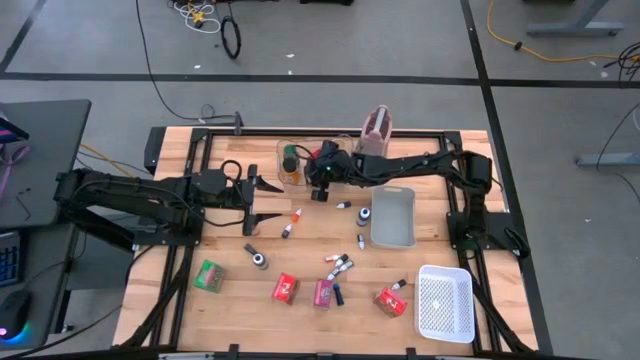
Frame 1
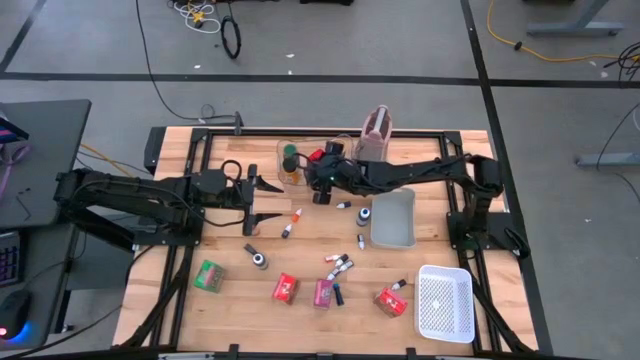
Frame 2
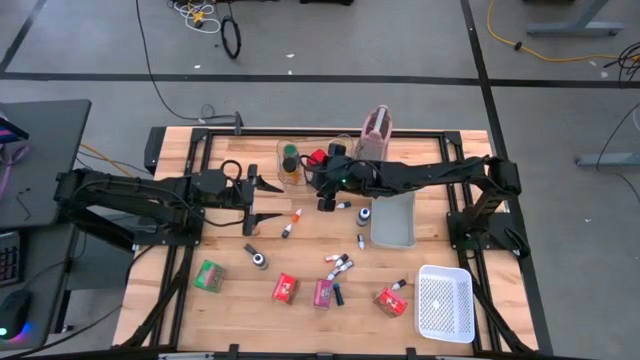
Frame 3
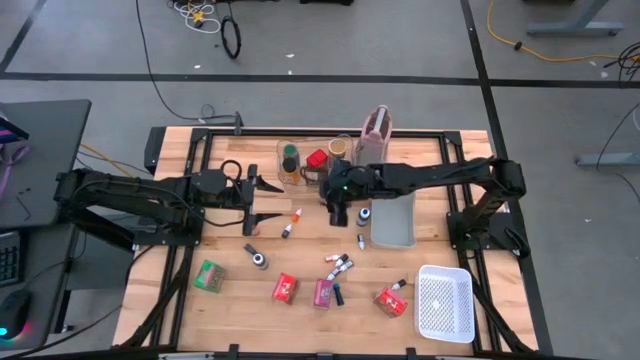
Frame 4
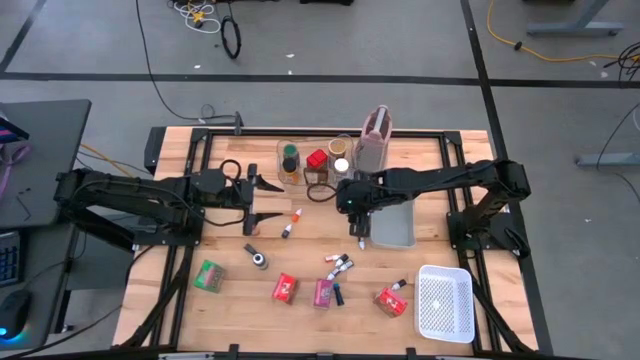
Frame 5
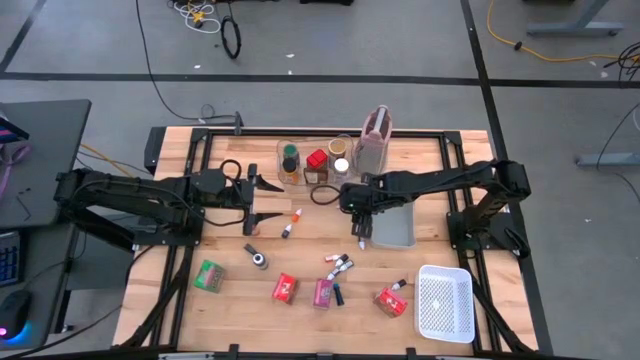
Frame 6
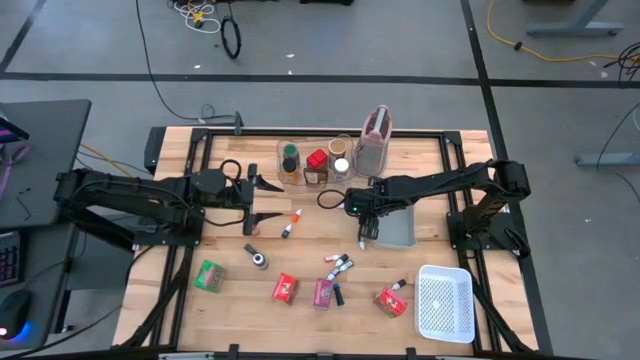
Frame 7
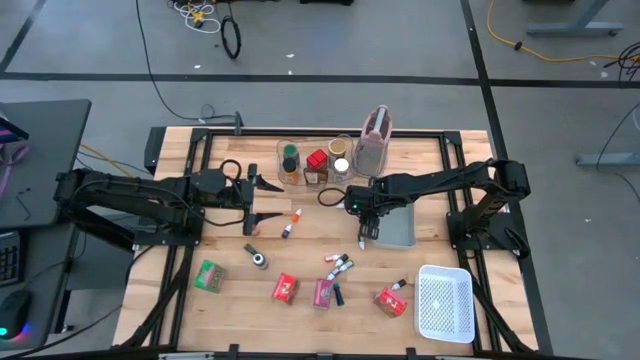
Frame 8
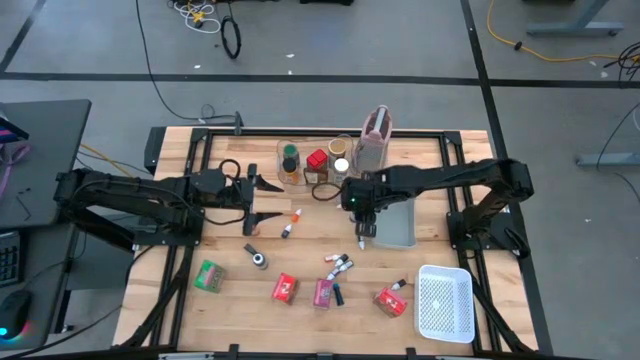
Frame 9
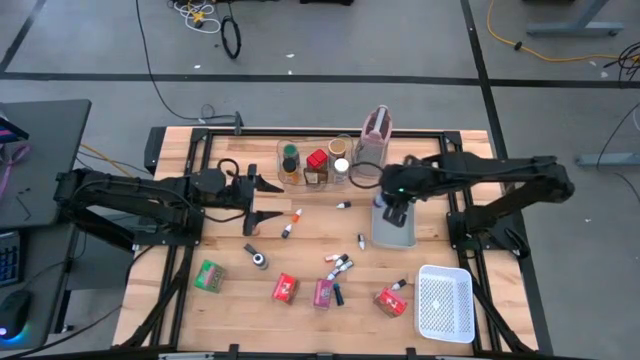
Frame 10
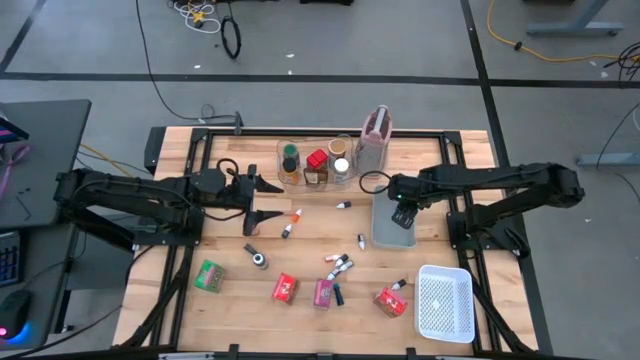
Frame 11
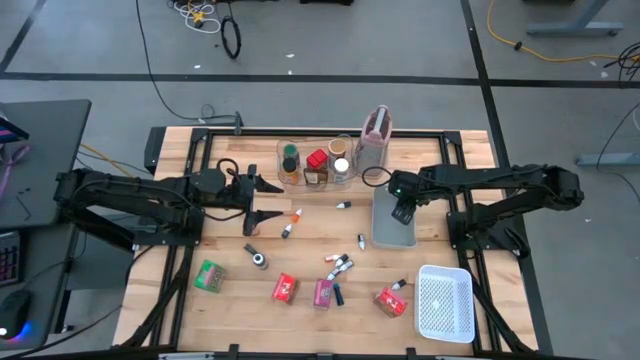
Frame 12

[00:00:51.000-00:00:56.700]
Task: Pick & Place Kitchen Items
Put the large blue food coloring bottle into the gray bin

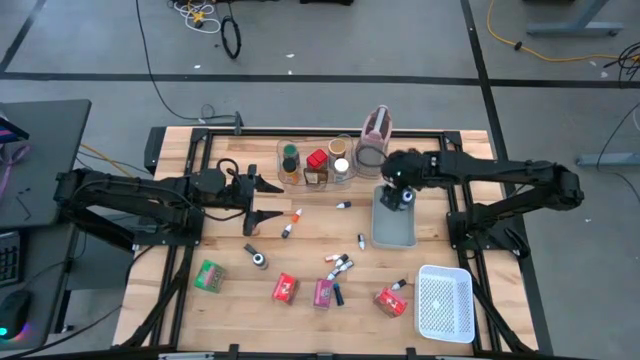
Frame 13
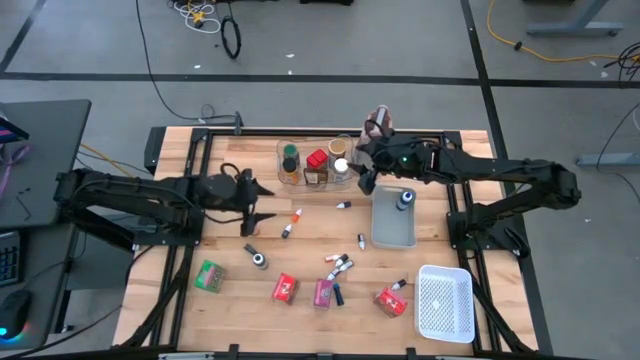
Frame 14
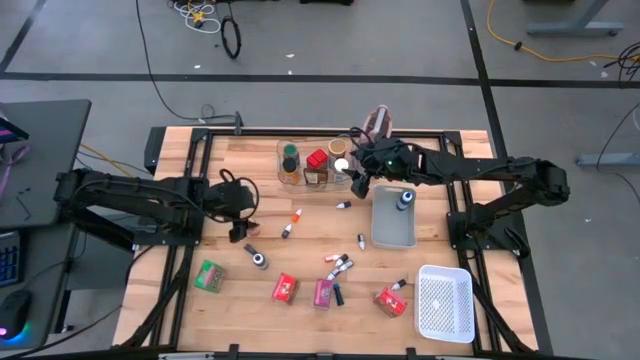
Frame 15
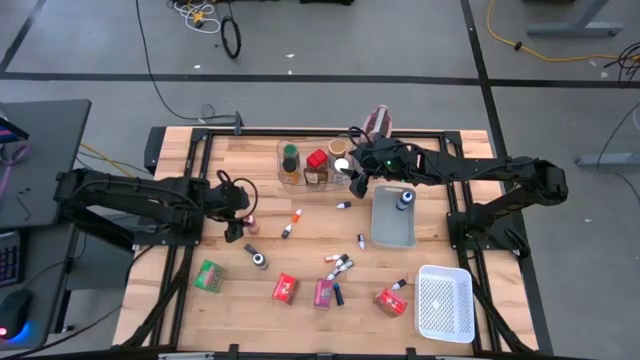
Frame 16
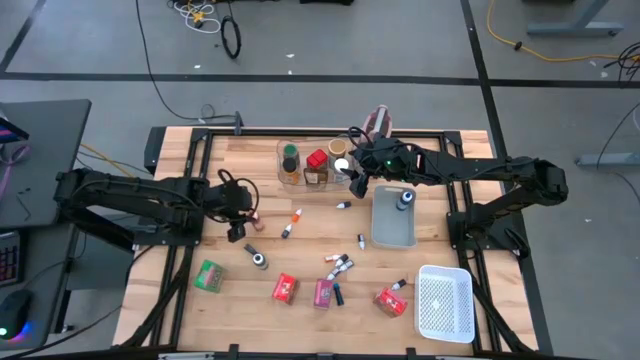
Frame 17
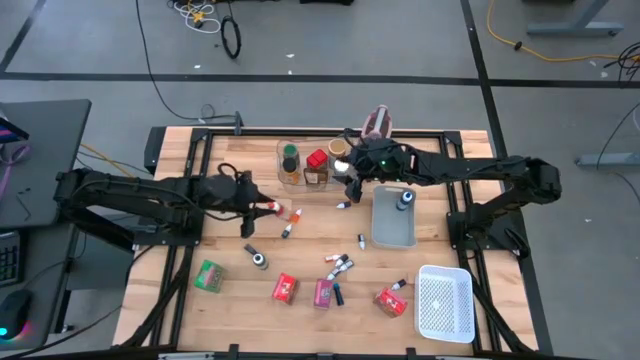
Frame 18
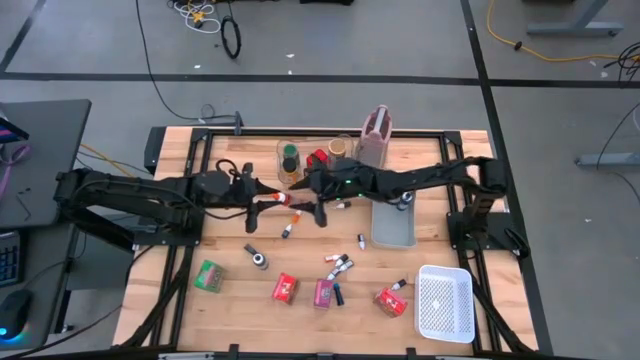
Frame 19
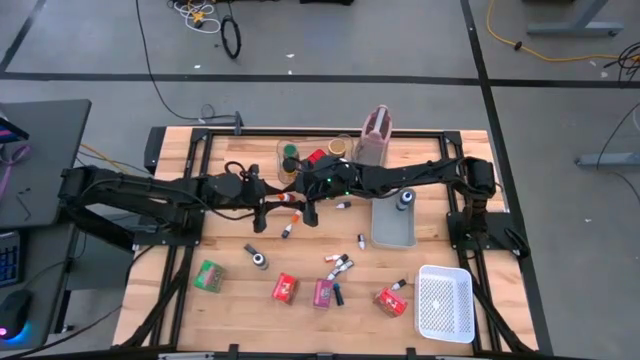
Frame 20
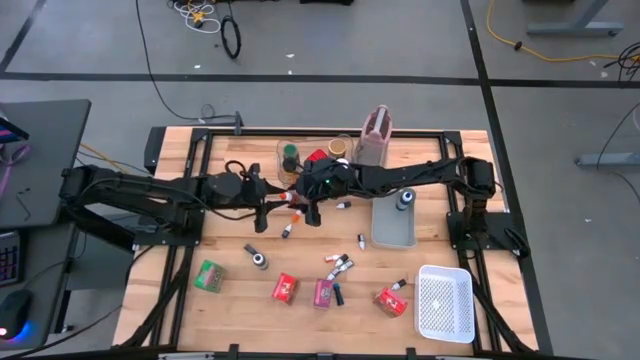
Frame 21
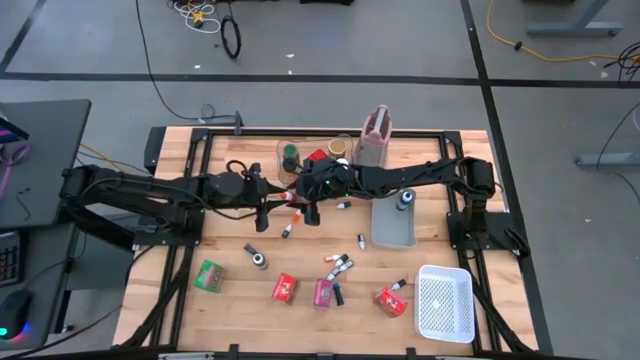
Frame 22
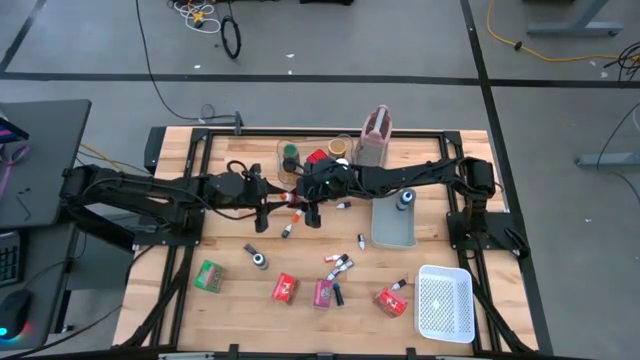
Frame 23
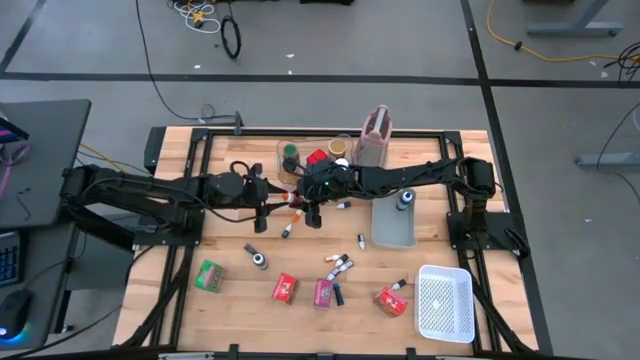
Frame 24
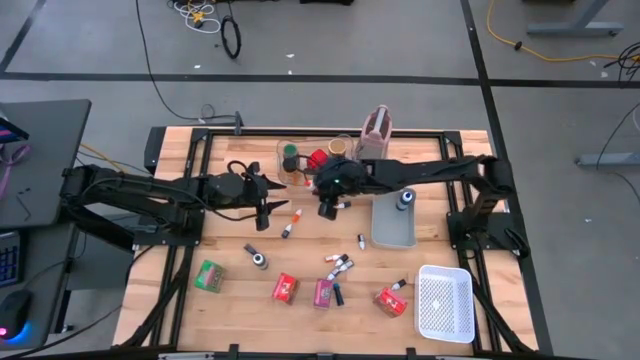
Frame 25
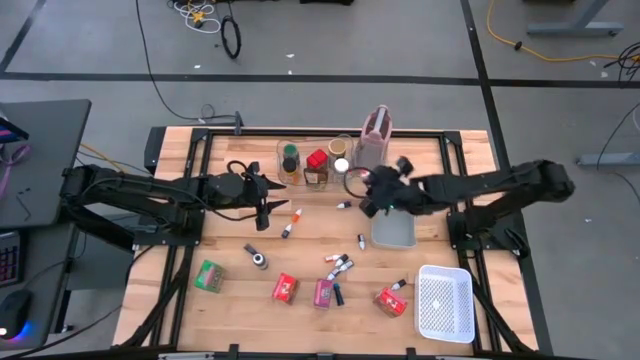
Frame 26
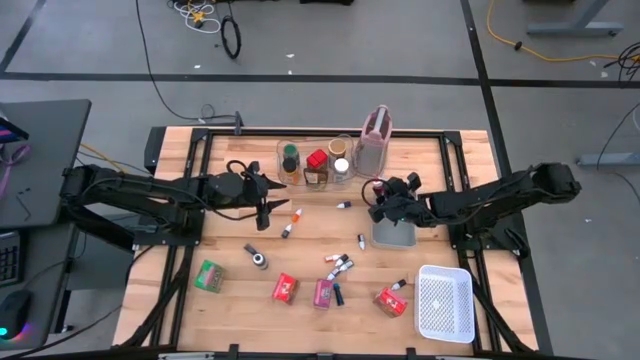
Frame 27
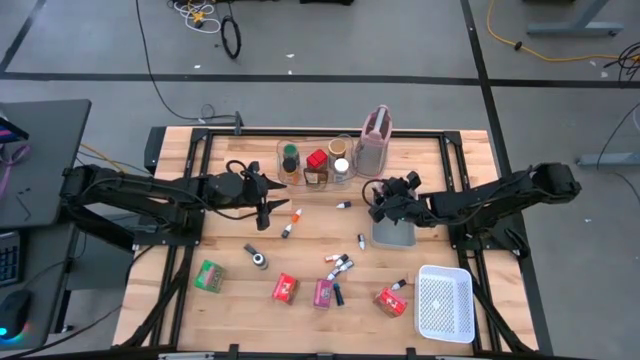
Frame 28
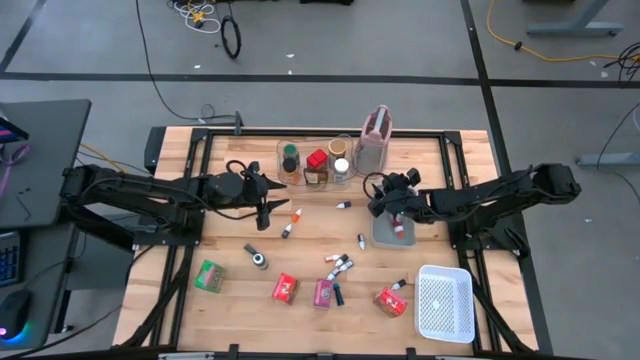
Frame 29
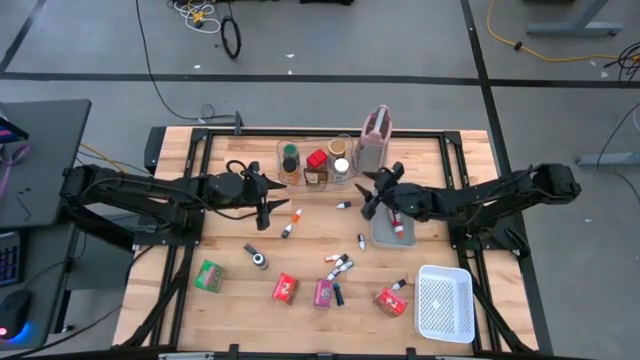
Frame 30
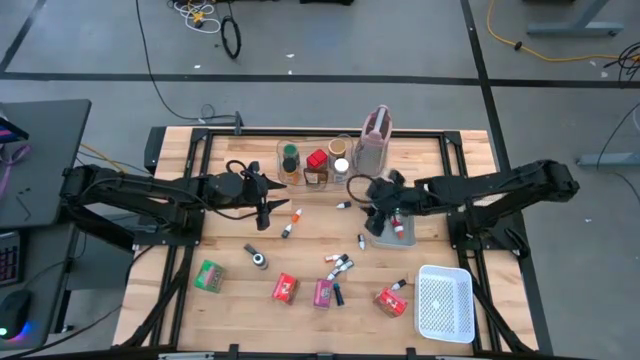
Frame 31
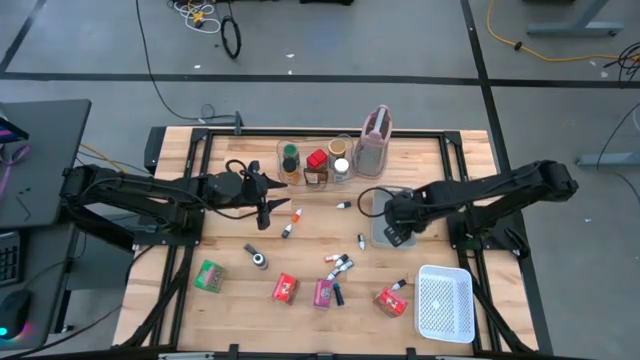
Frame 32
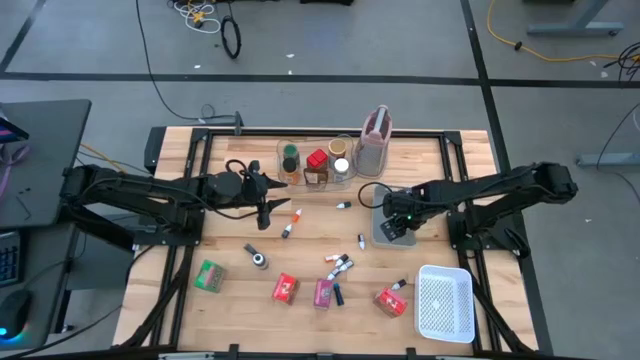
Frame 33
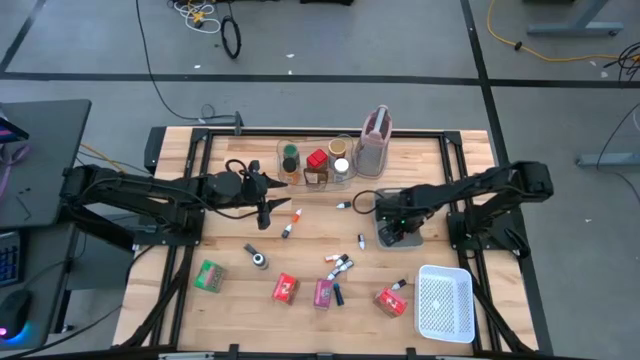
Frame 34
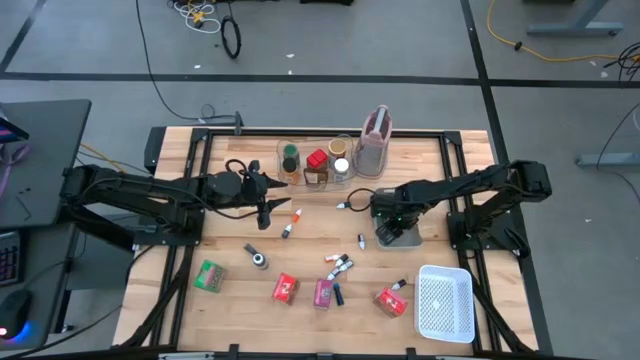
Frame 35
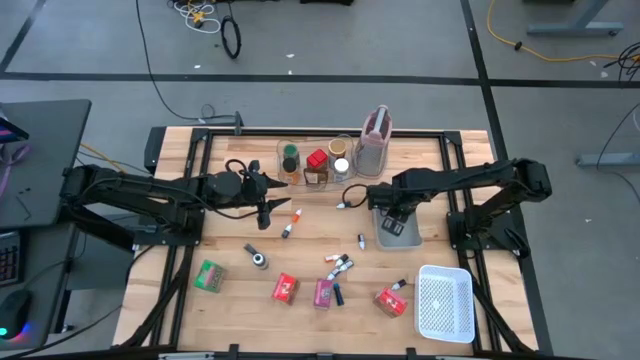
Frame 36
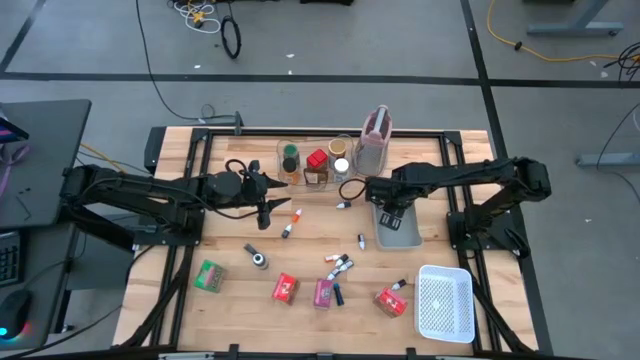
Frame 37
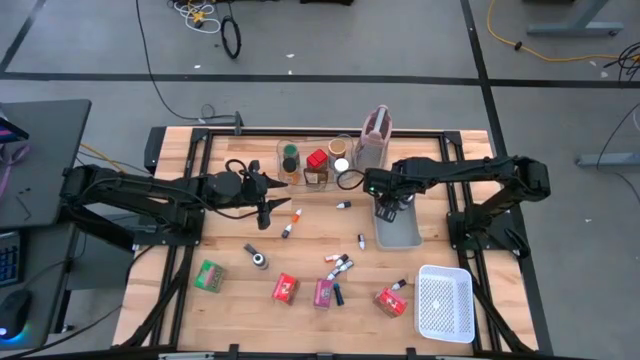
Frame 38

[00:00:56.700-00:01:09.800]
Put the large orange food coloring bottle into the gray bin
